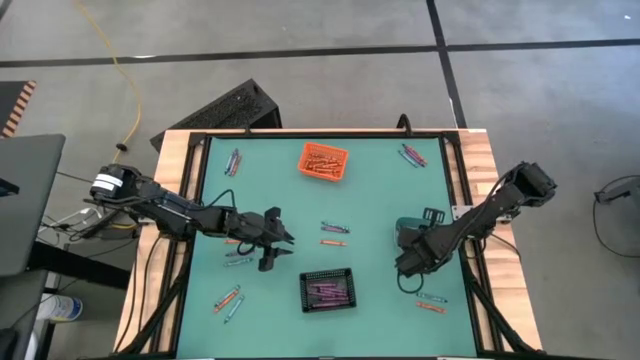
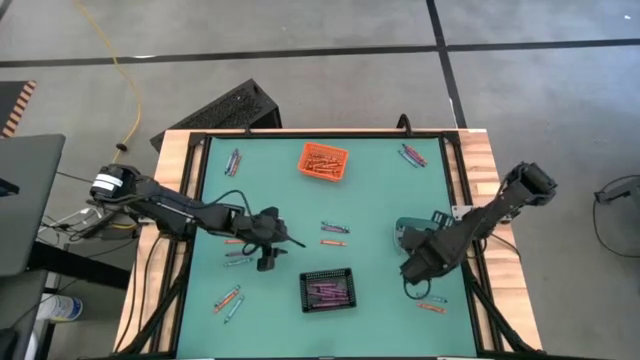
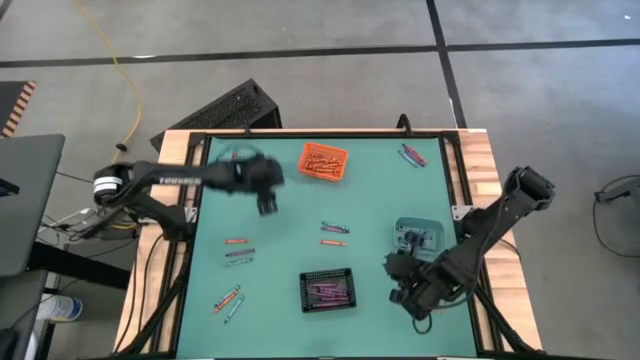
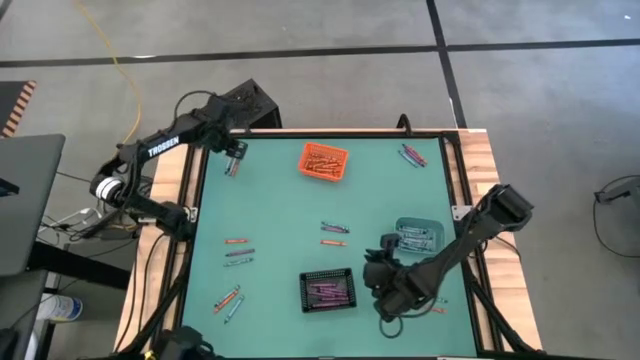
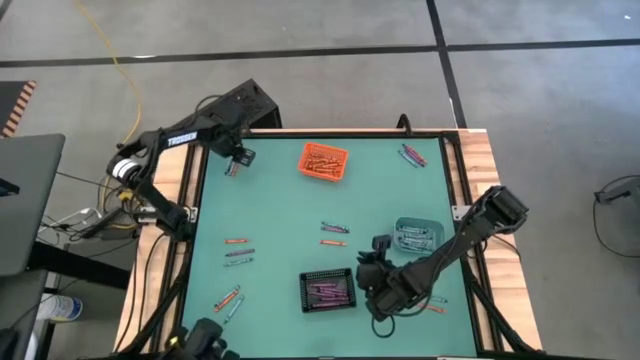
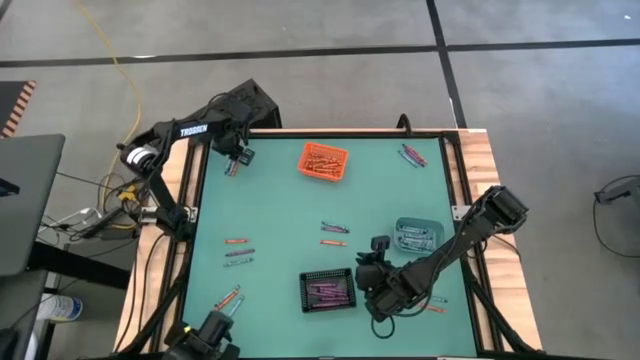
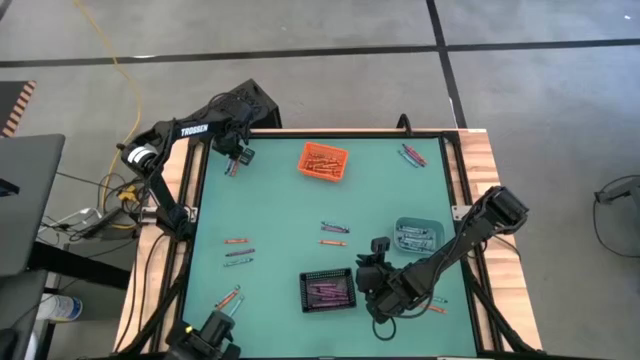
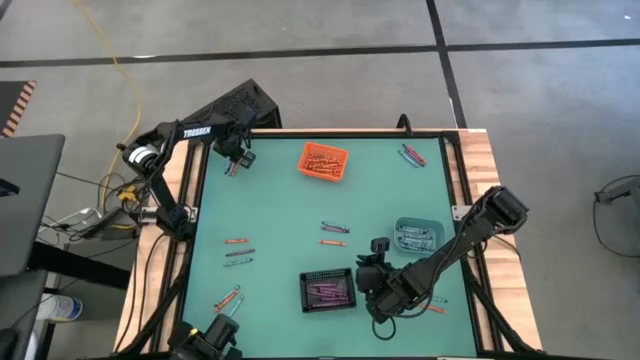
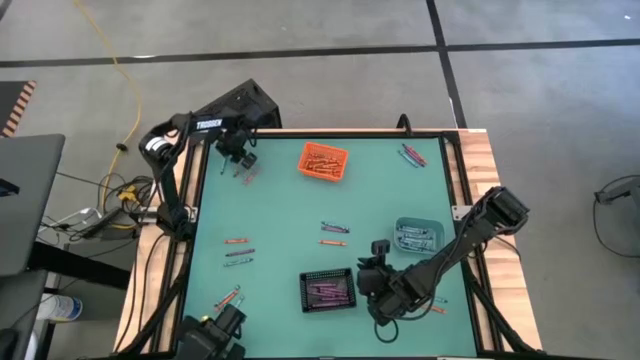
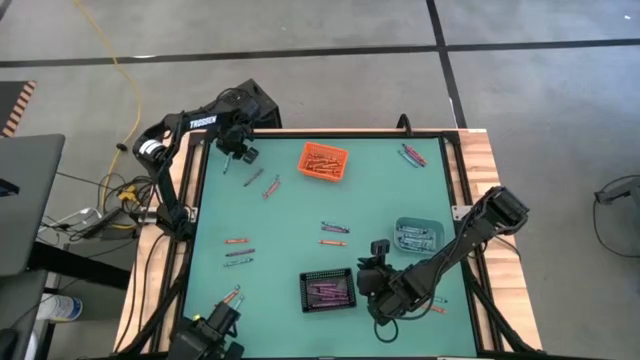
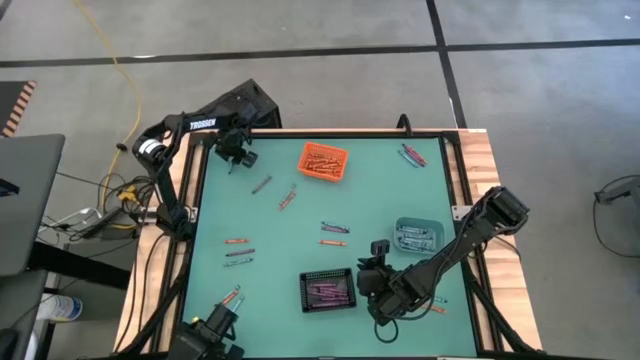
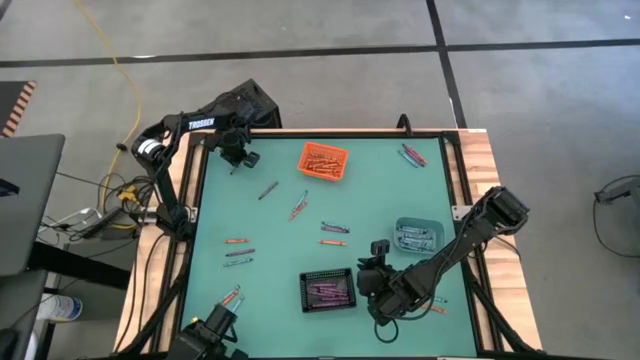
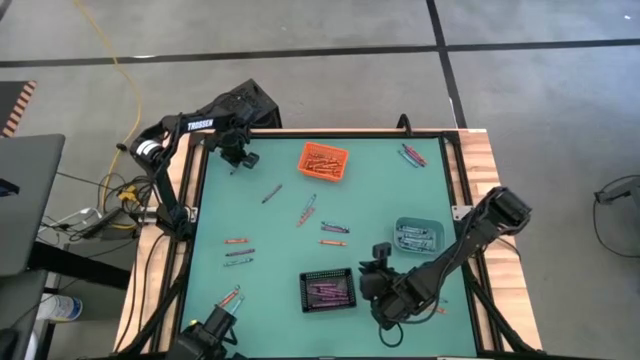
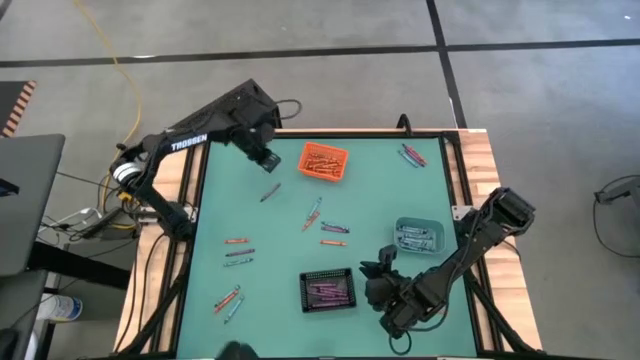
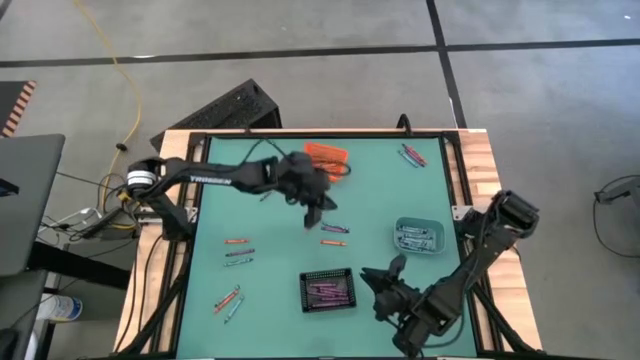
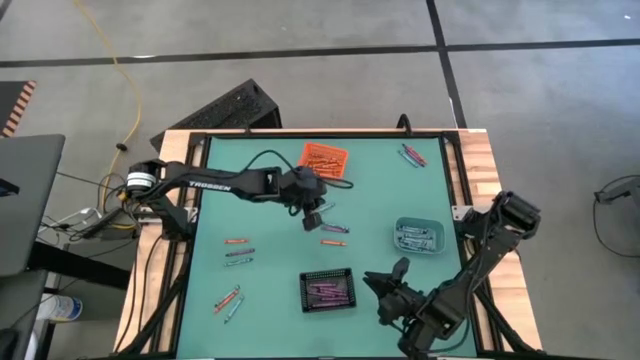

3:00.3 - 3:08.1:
Task: Sort crayons
Put the blue crayon into the blue bin

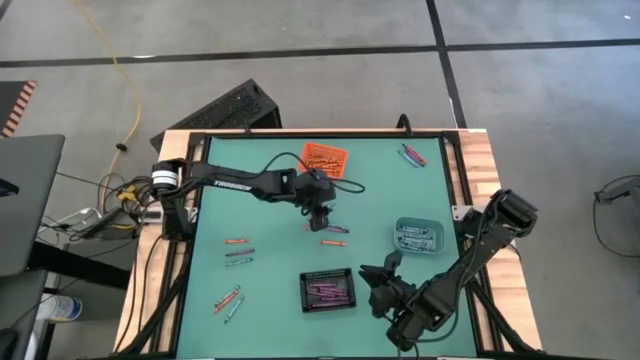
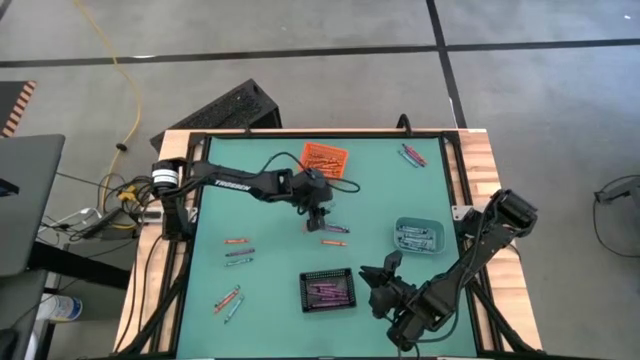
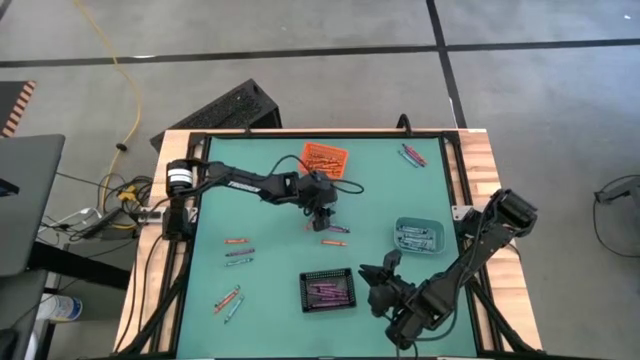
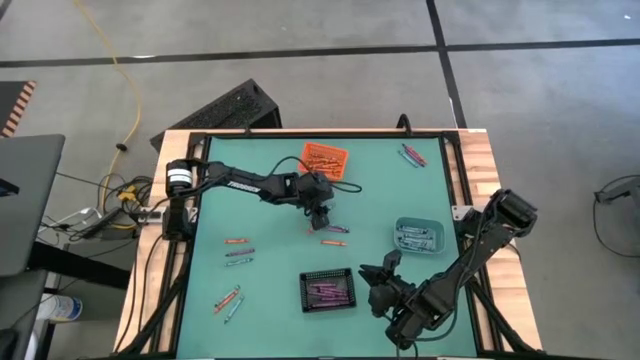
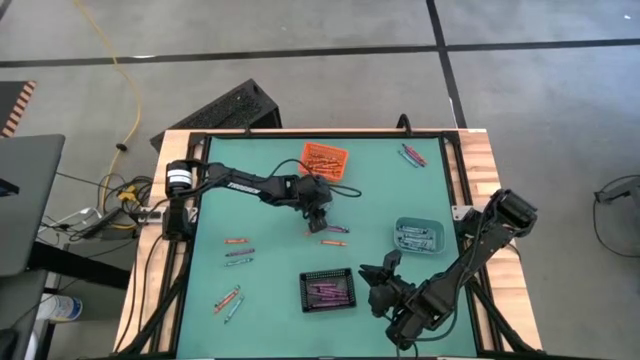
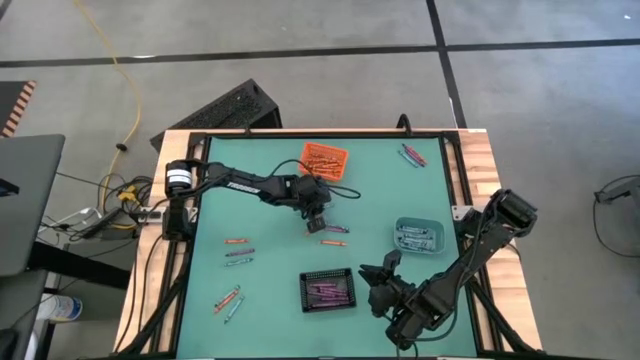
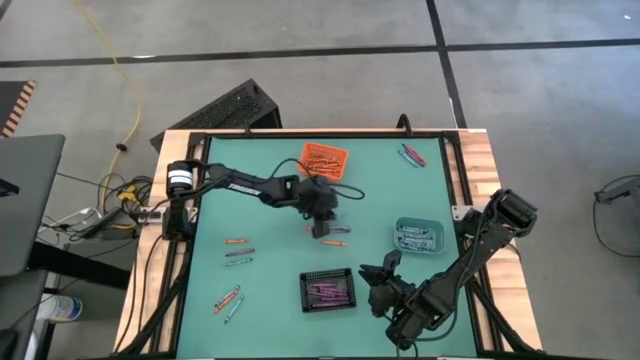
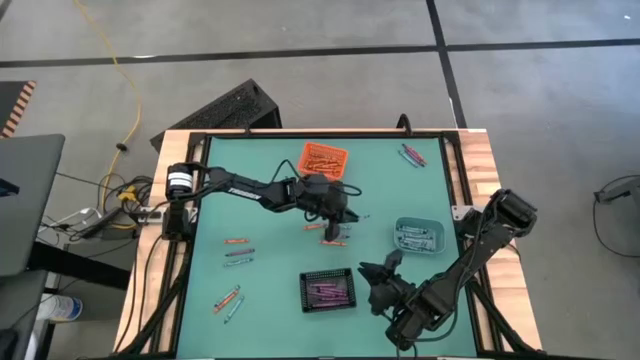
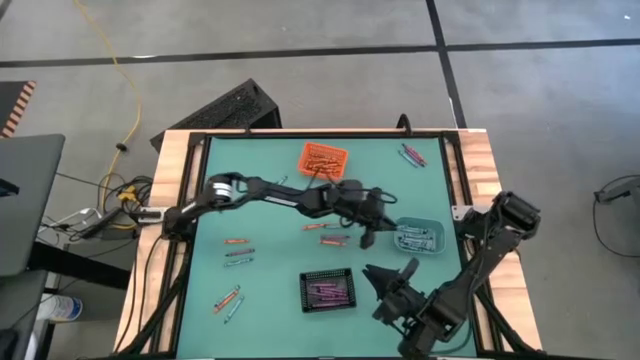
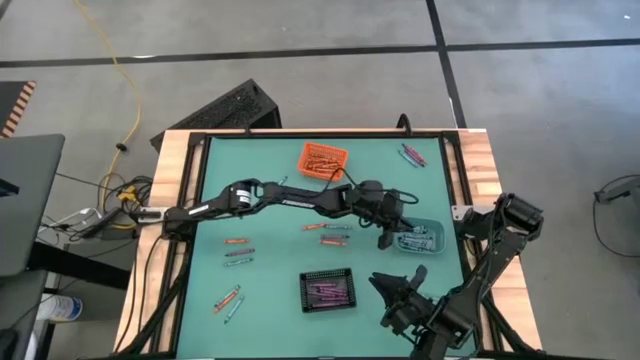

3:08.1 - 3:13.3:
Put the blue crayon into the blue bin

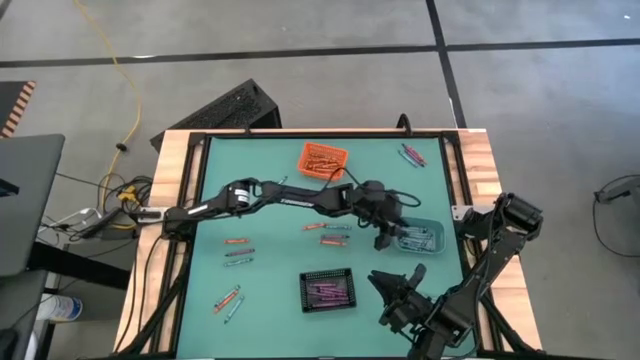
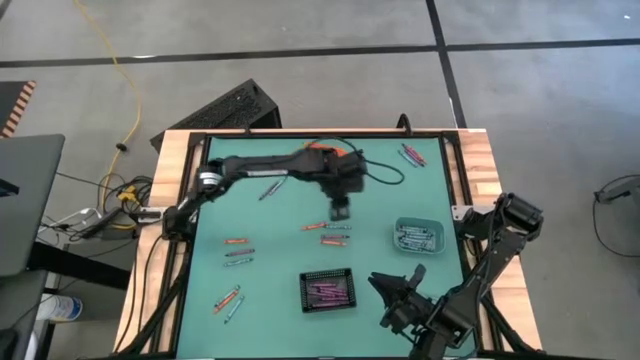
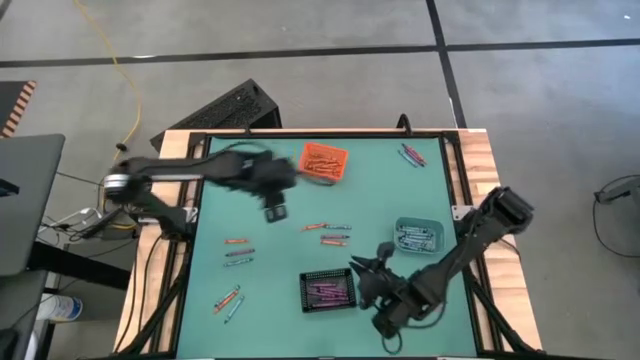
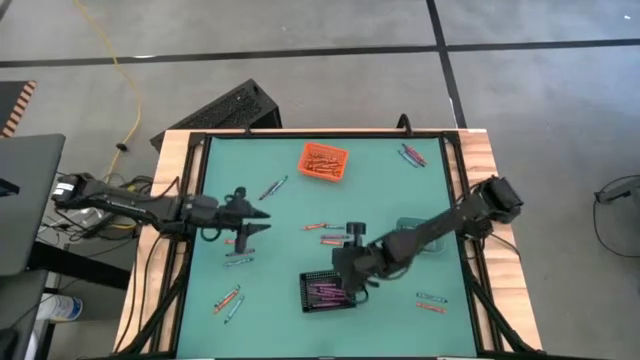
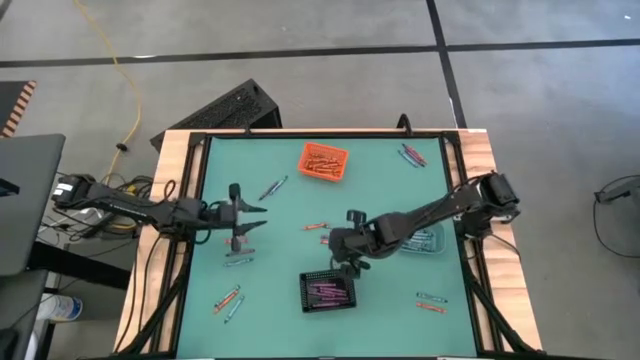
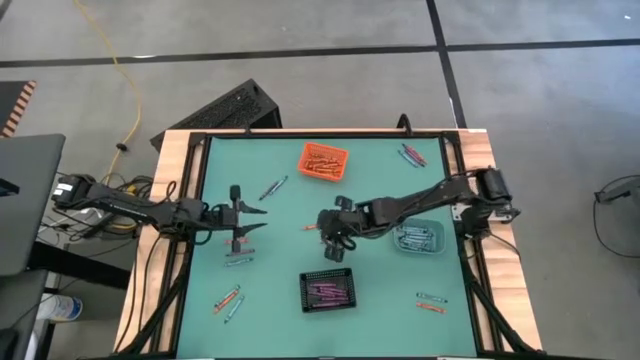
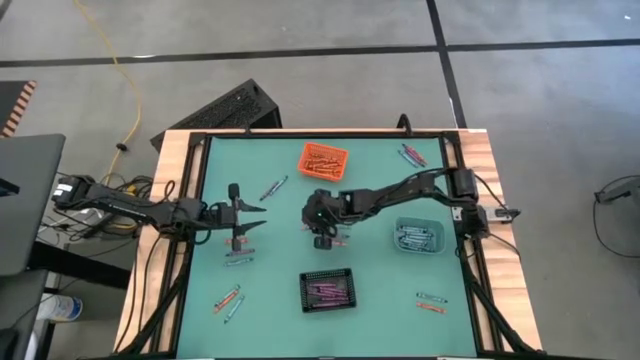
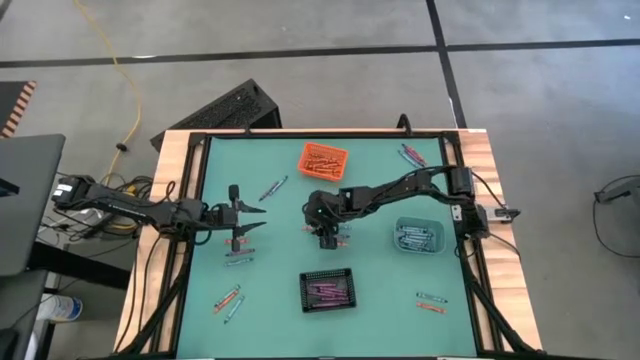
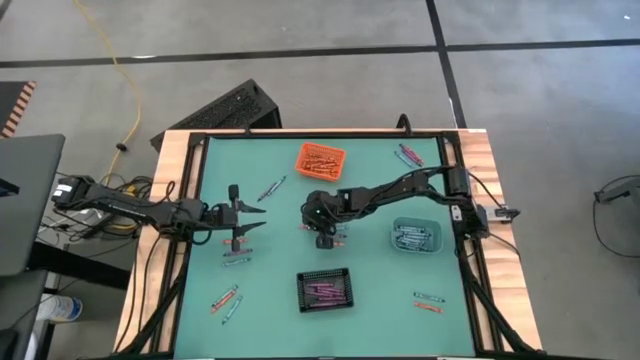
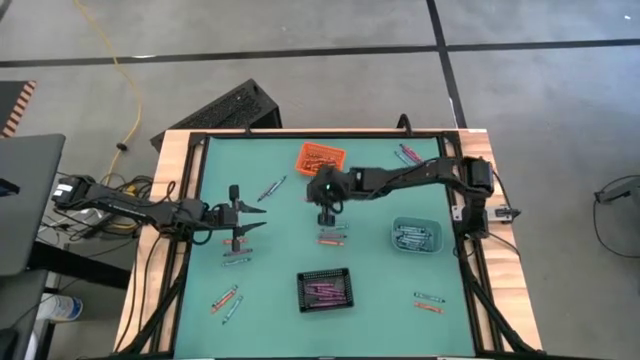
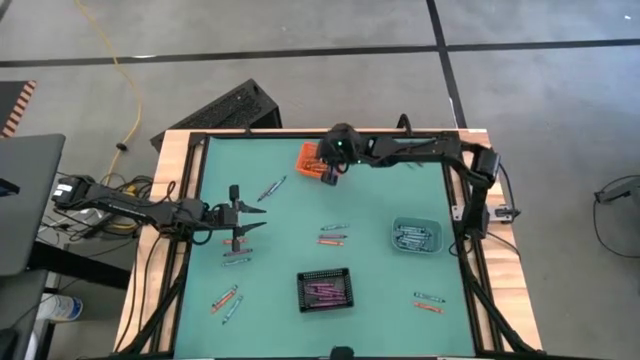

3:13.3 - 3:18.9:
Put the orange crayon into the orange bin

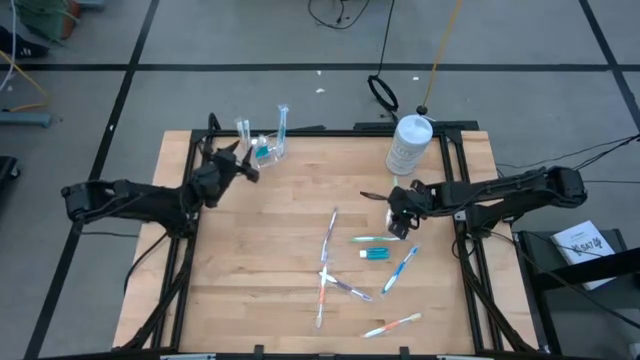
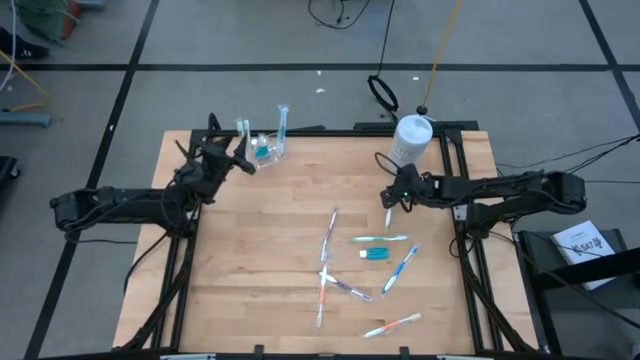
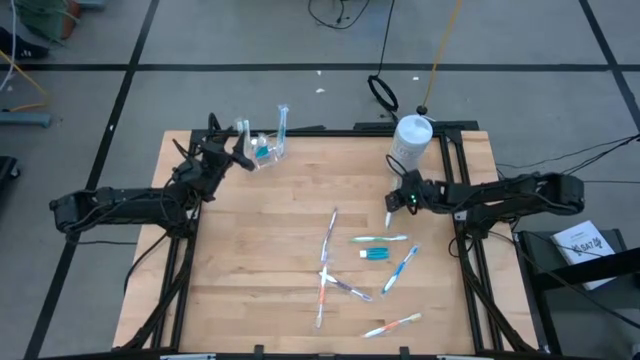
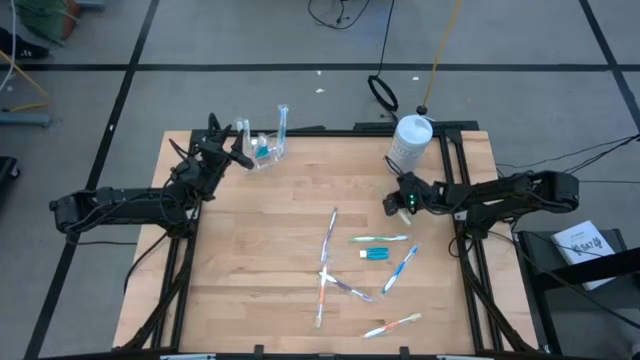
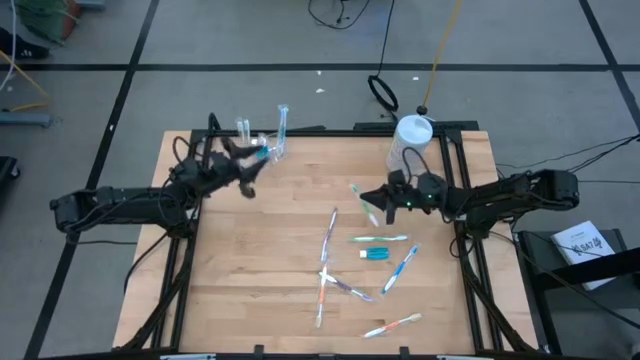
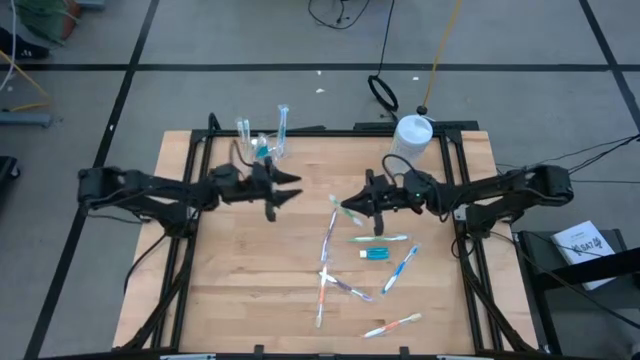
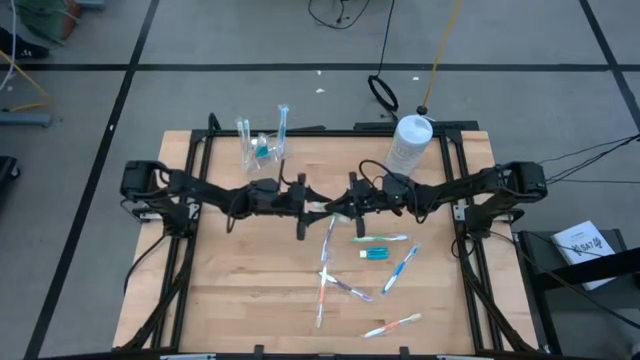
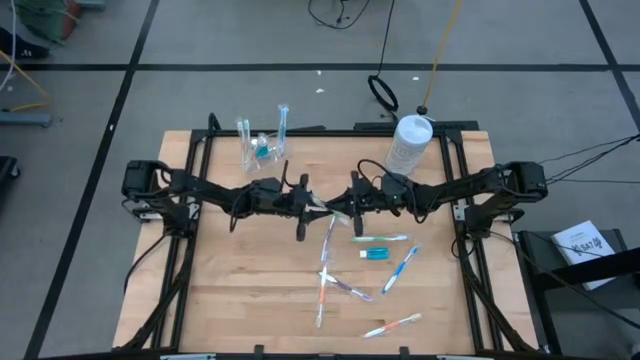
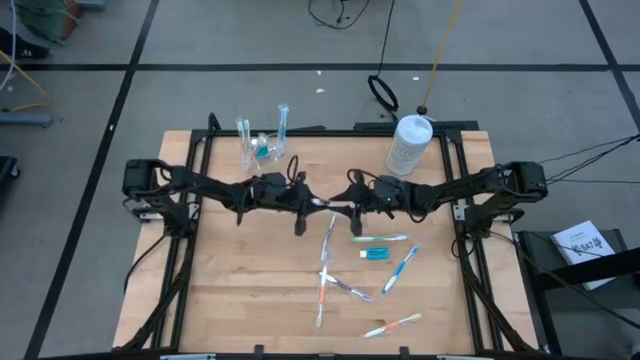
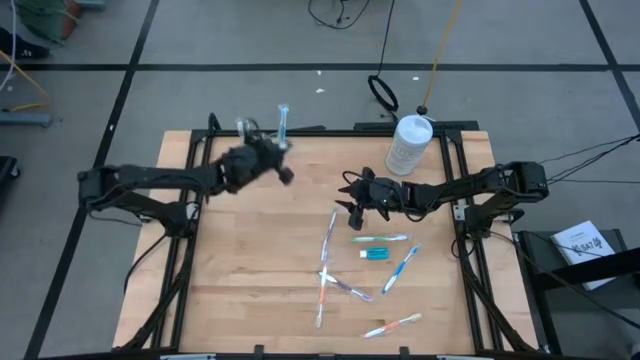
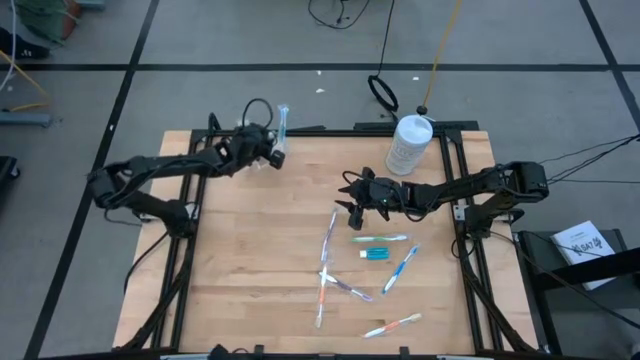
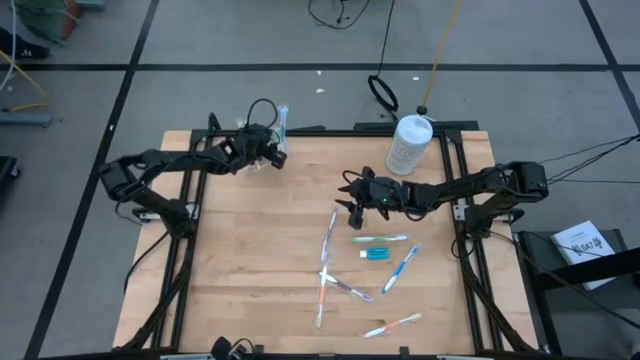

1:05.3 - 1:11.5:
Task: Pick & Place toothbrushing station
Put the green toothbrush into the transparent organizer
